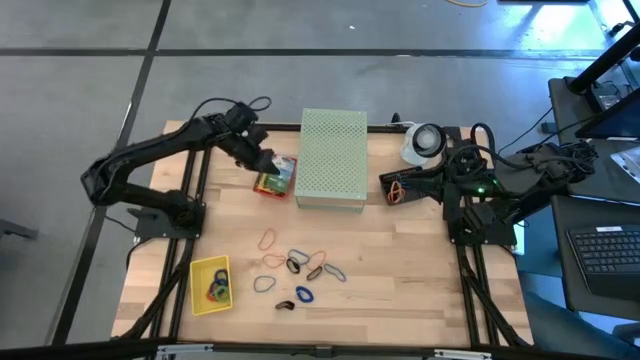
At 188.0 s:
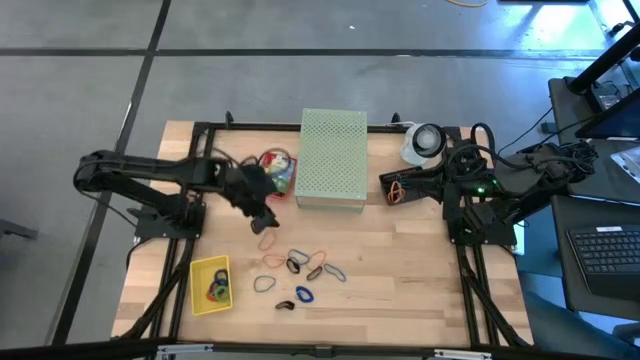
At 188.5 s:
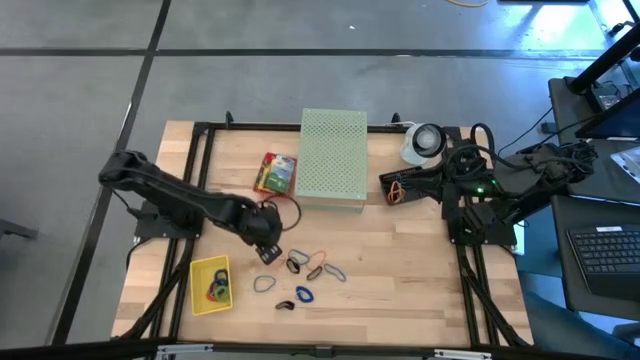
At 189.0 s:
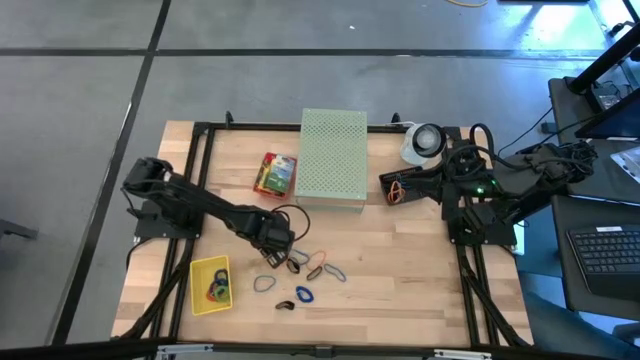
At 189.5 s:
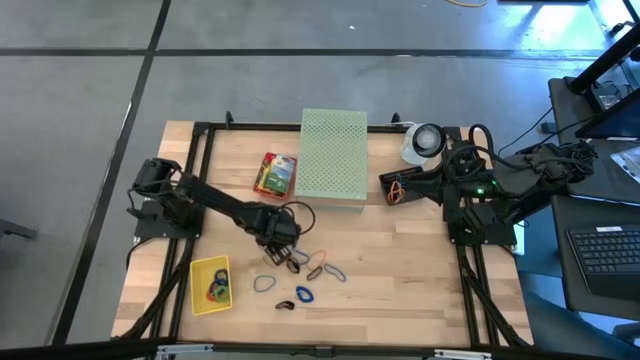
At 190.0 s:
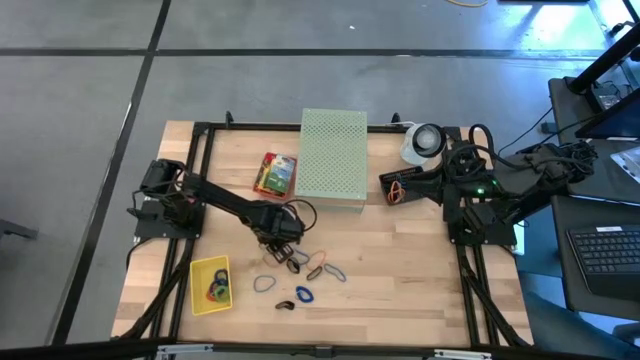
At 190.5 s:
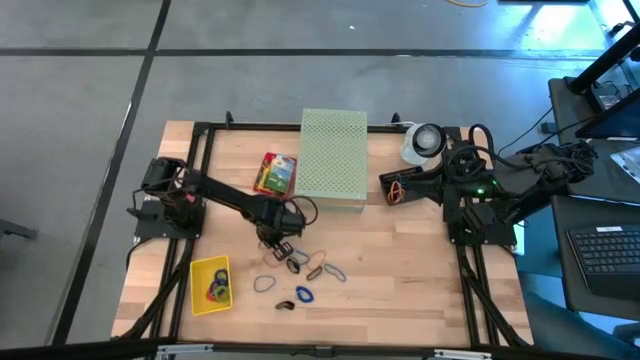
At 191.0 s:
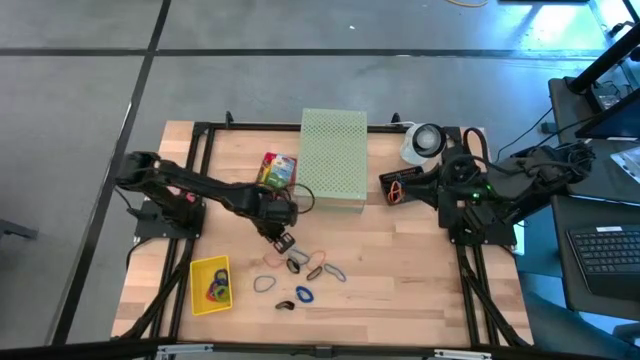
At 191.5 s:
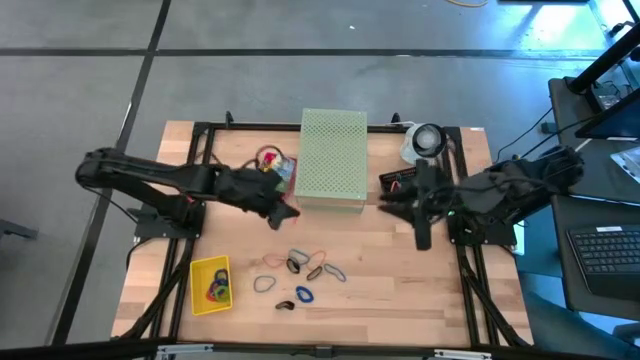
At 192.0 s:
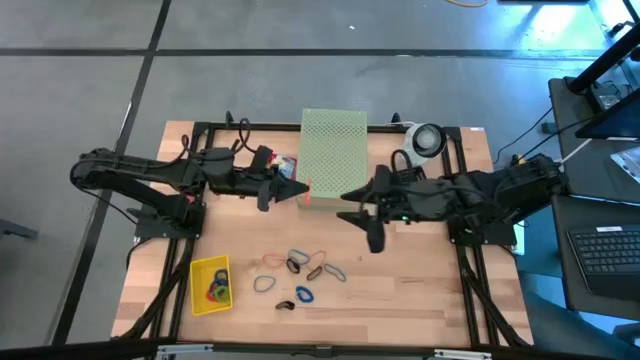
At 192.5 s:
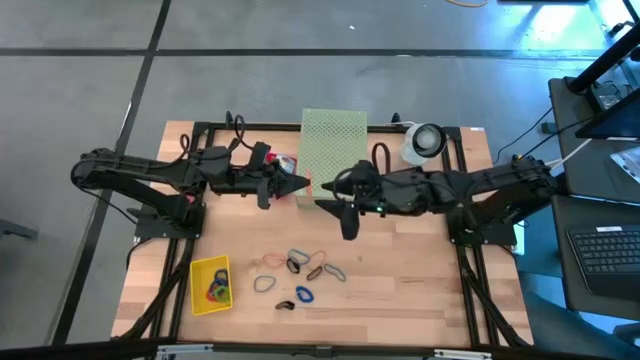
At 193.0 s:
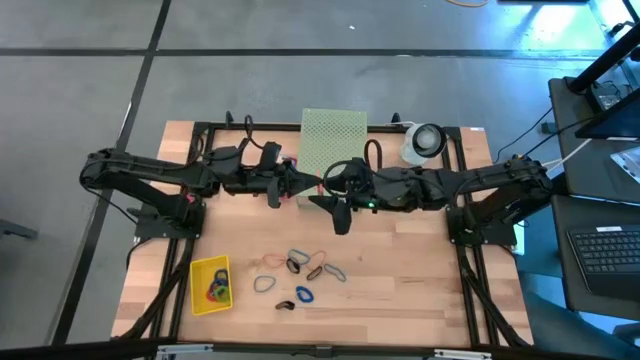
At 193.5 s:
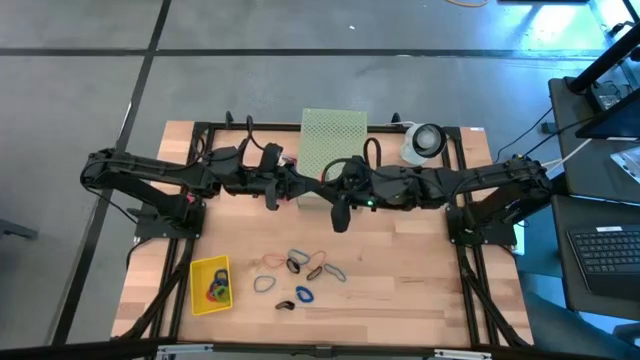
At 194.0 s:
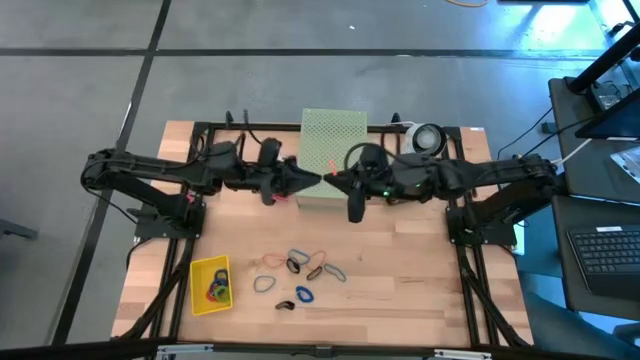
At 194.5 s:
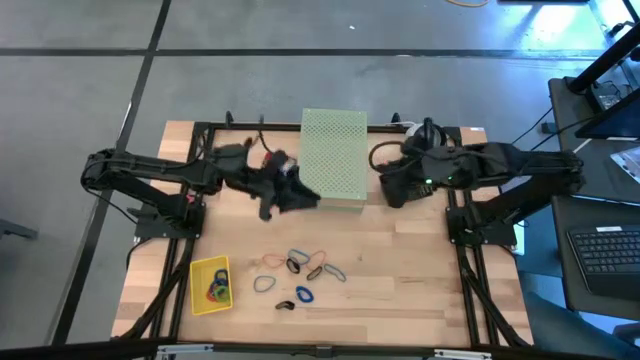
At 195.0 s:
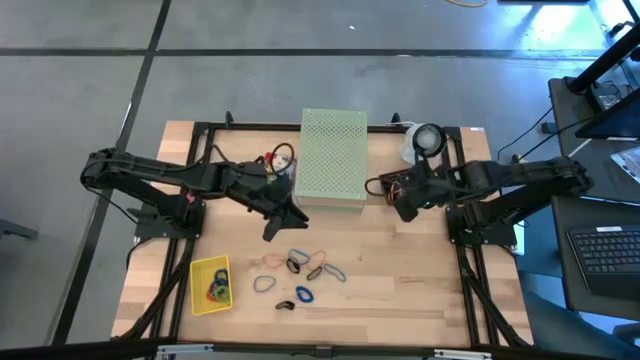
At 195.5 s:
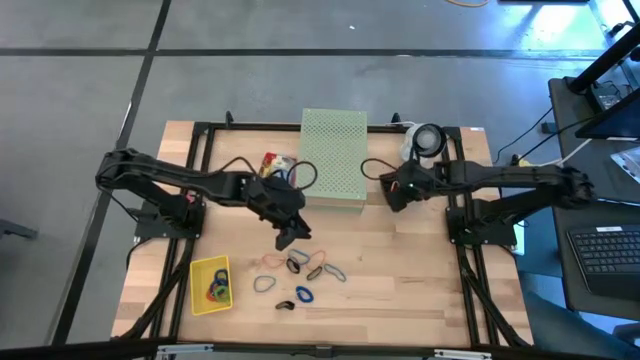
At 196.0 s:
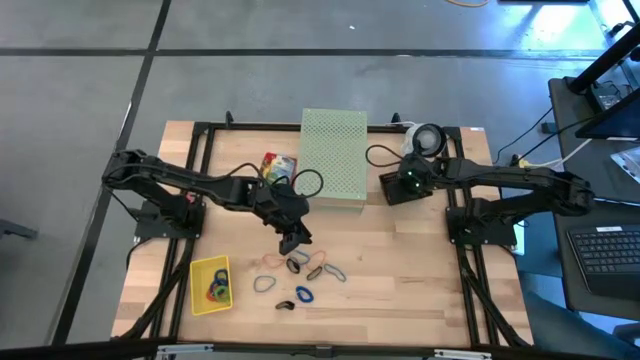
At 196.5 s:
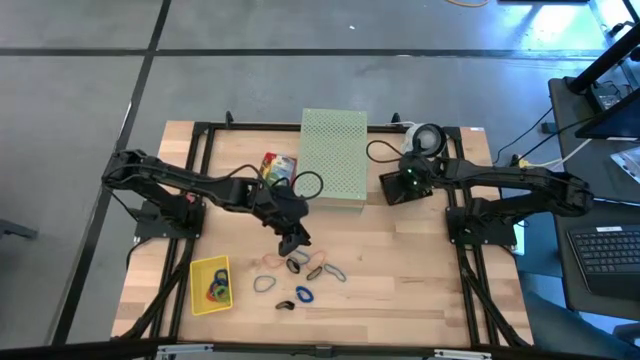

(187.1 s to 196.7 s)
Task: Pick & Place Office Desk Supplies
Put the orange rubber band into the black bin

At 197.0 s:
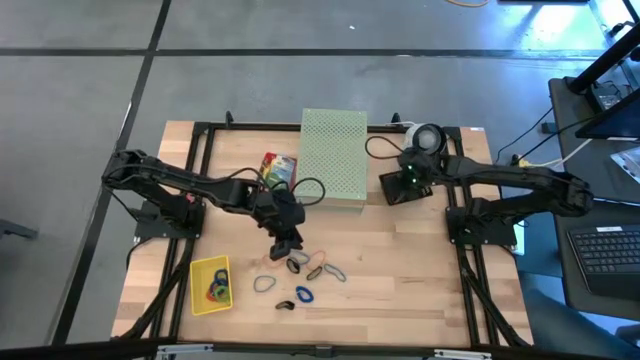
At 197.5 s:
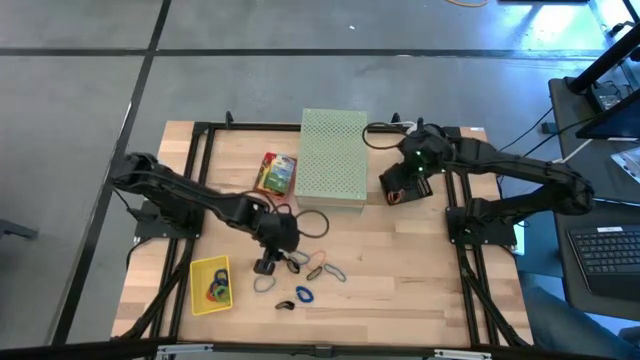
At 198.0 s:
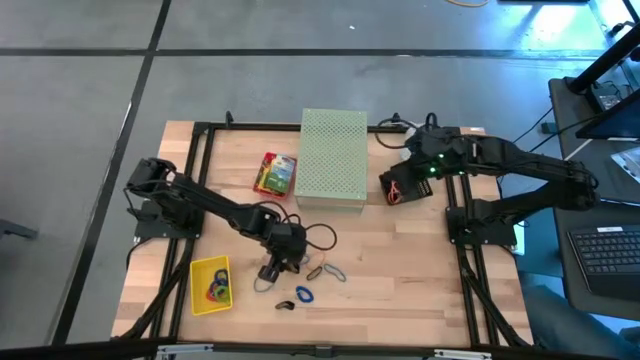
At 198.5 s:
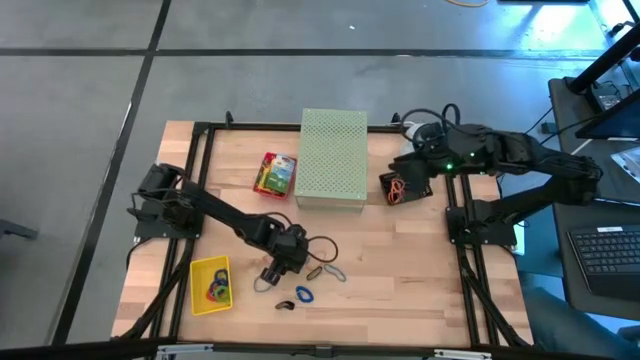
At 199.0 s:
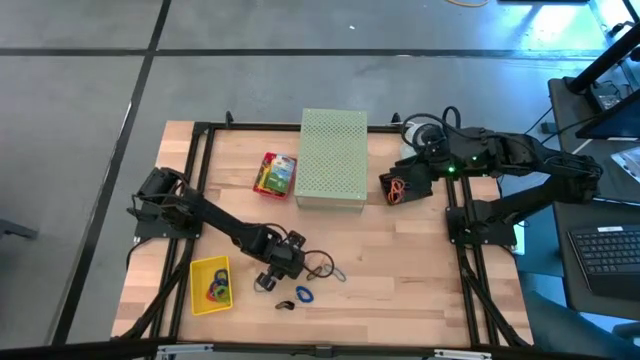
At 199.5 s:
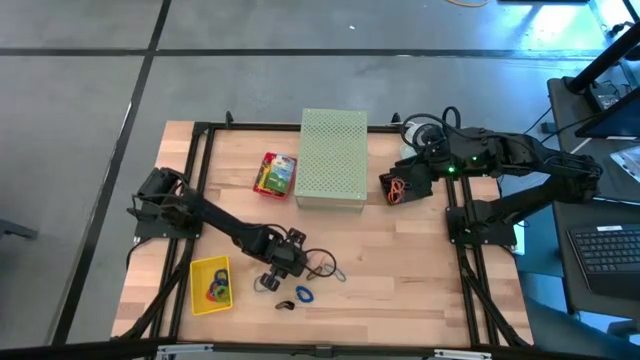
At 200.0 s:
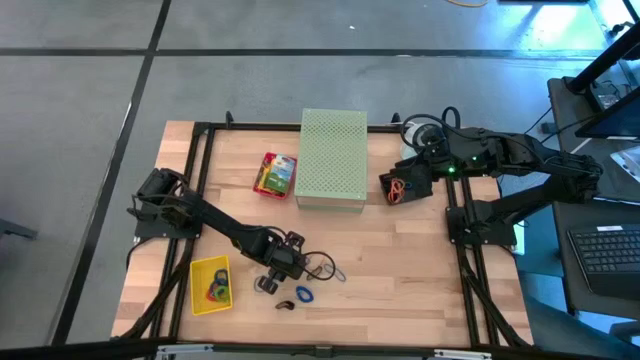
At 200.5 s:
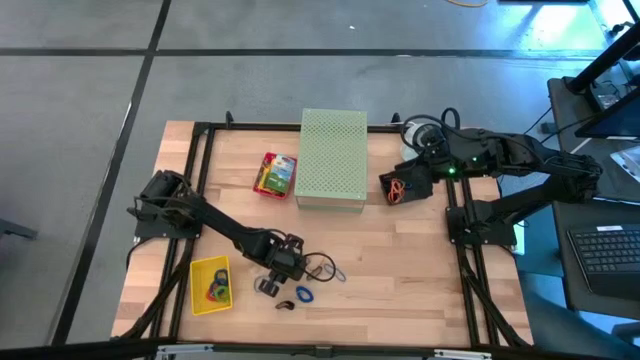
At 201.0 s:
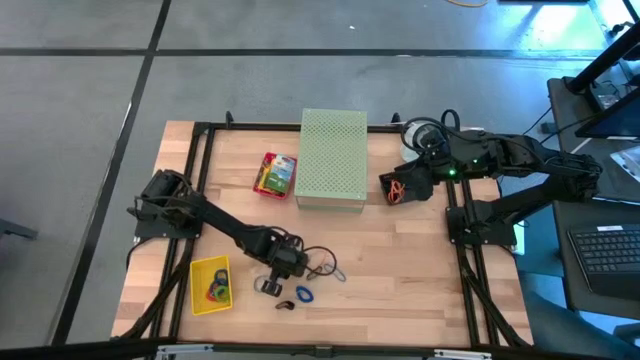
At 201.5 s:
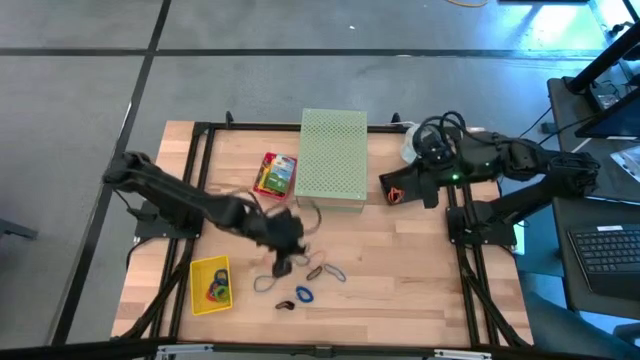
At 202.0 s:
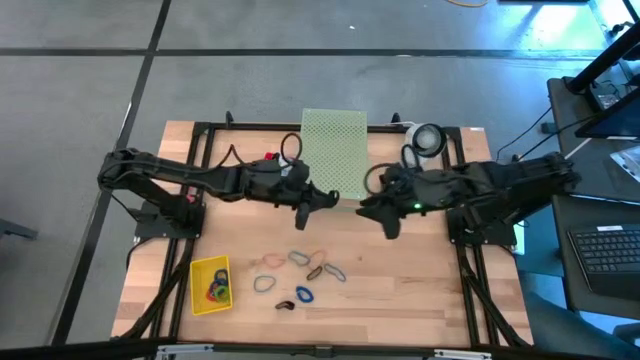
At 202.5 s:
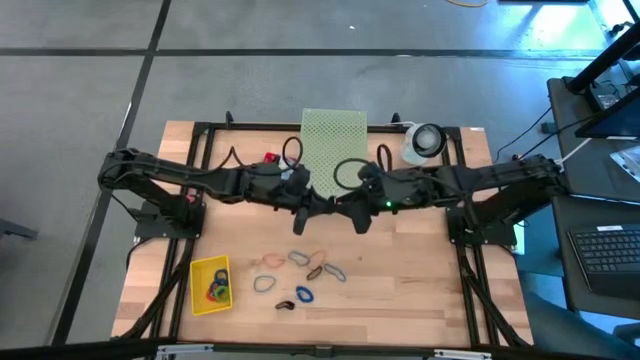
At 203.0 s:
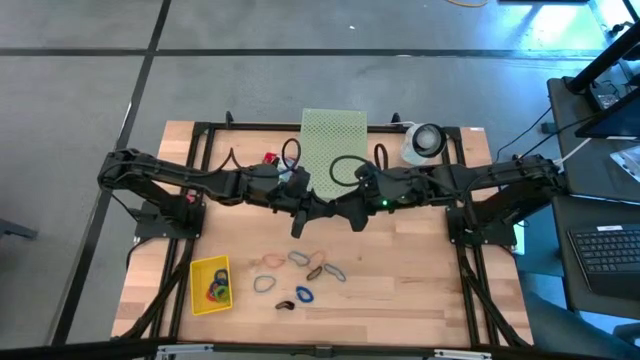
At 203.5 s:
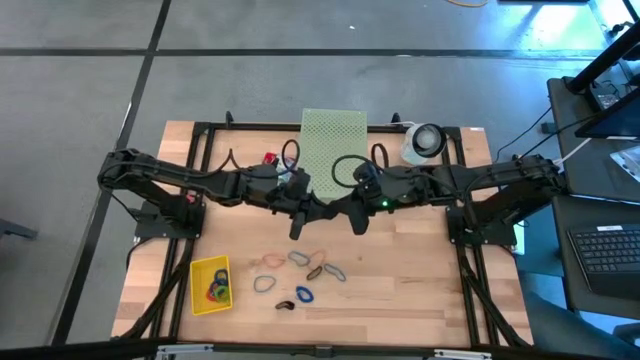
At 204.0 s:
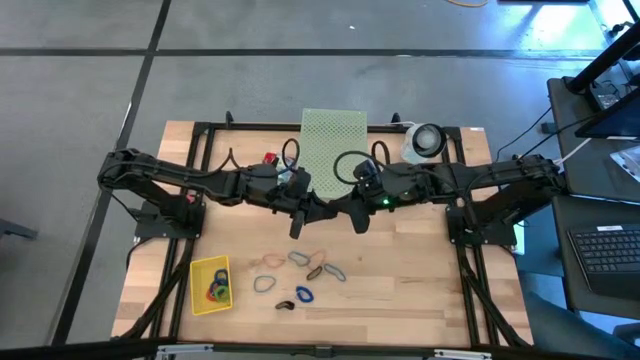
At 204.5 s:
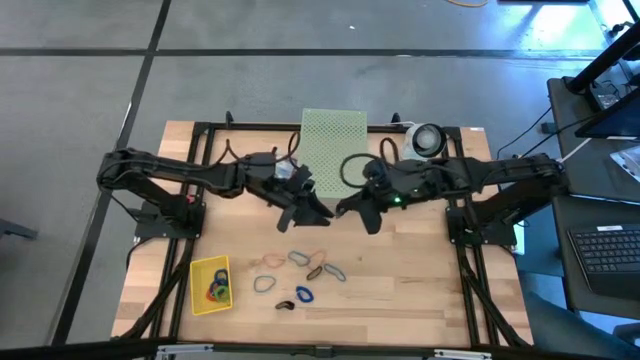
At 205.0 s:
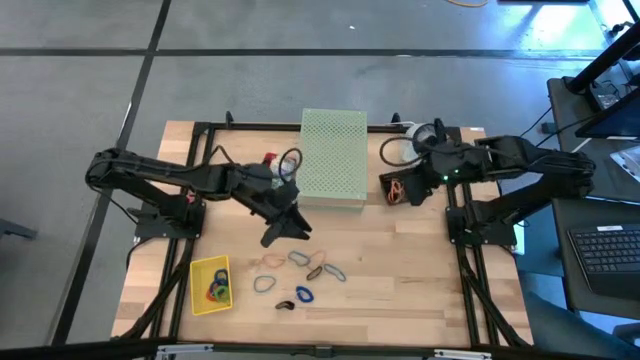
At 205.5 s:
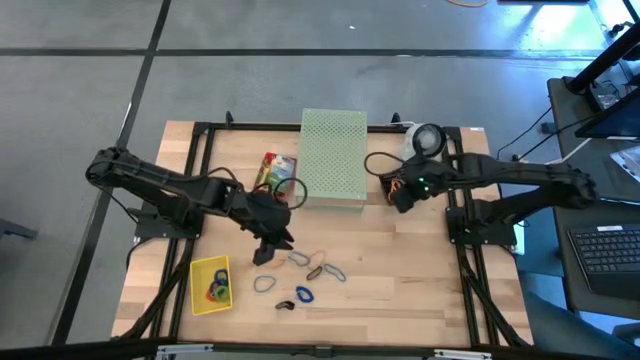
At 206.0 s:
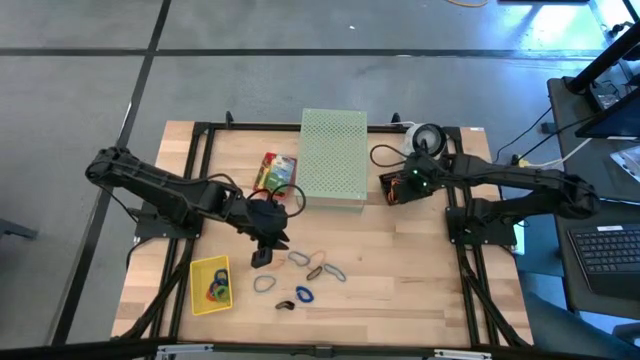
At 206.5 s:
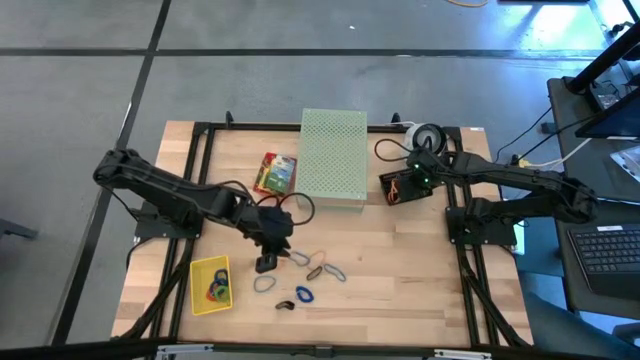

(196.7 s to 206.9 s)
Put the black rubber band into the black bin
